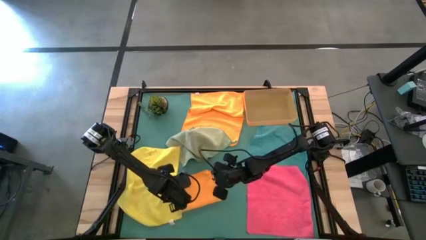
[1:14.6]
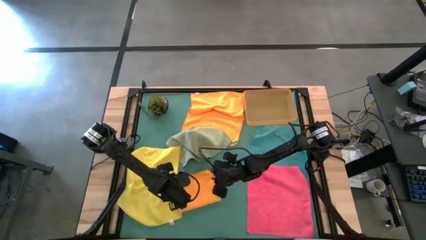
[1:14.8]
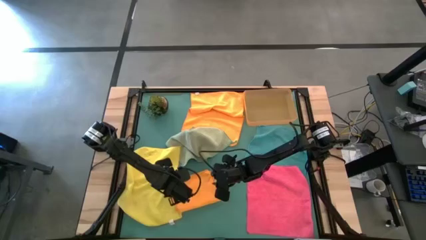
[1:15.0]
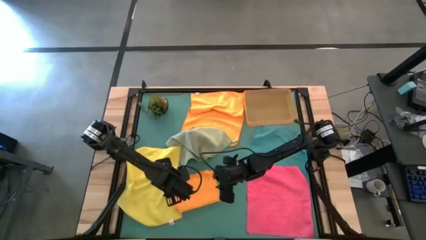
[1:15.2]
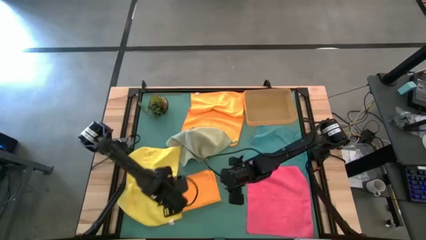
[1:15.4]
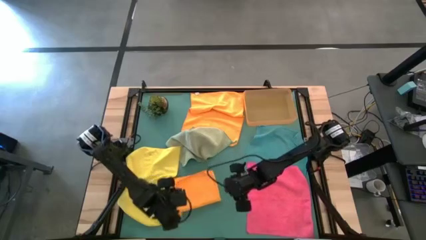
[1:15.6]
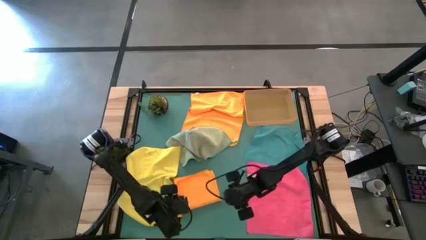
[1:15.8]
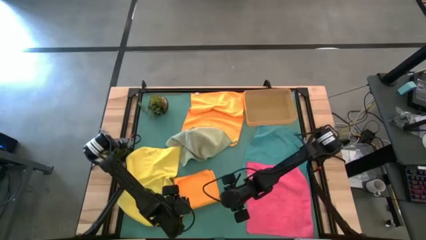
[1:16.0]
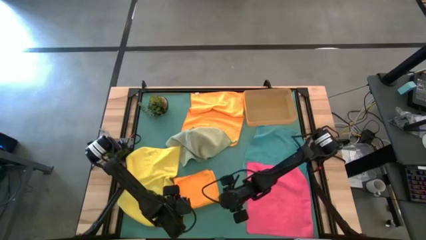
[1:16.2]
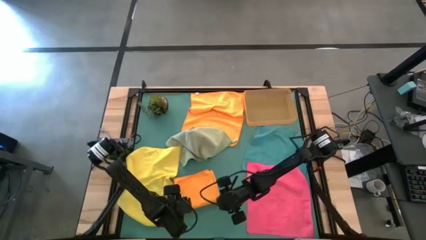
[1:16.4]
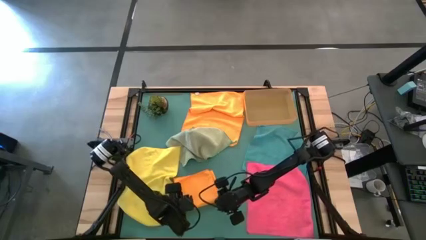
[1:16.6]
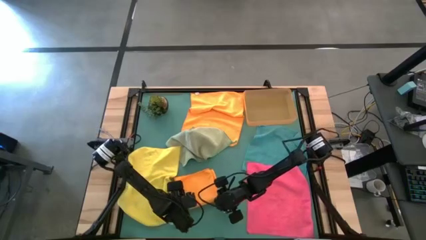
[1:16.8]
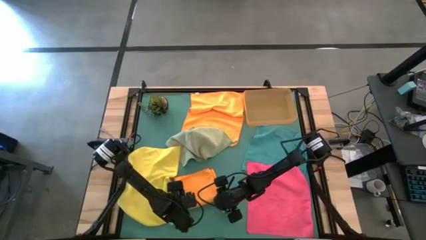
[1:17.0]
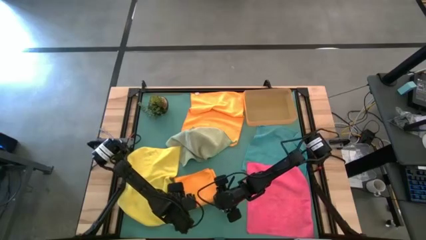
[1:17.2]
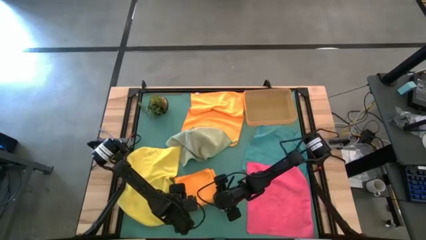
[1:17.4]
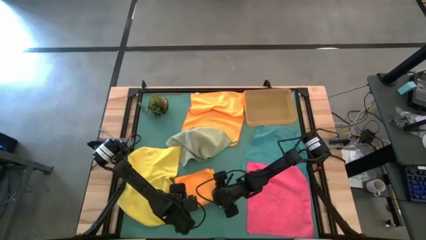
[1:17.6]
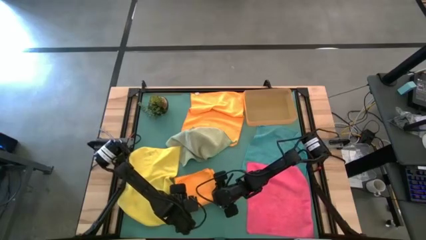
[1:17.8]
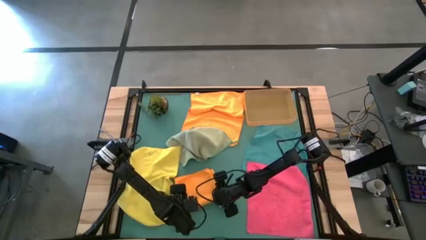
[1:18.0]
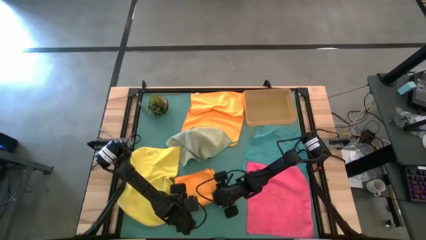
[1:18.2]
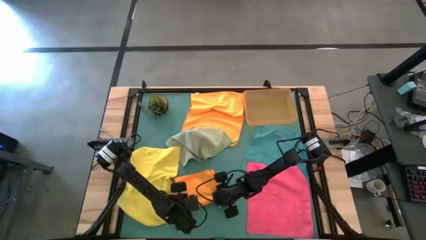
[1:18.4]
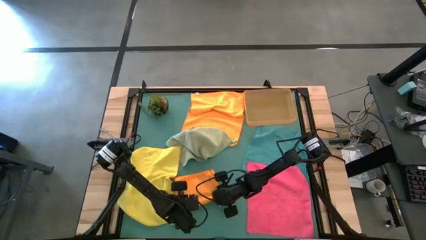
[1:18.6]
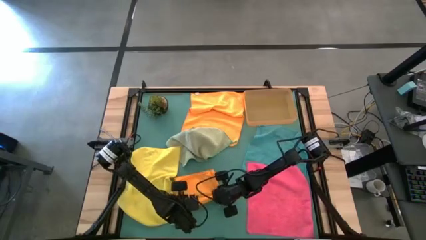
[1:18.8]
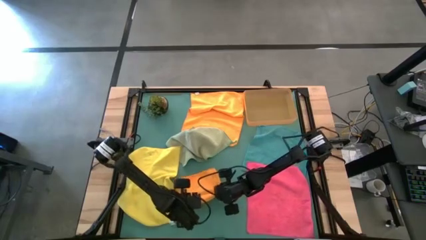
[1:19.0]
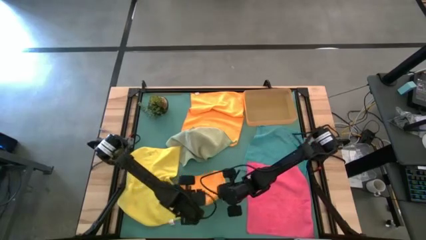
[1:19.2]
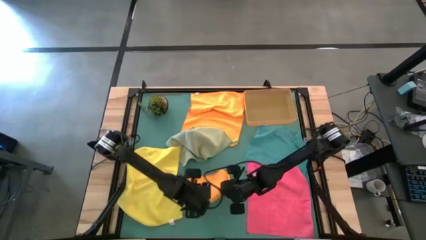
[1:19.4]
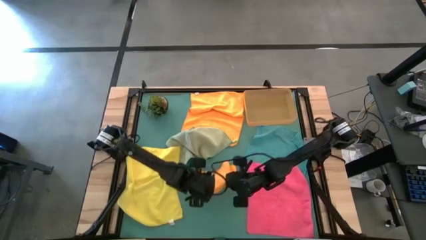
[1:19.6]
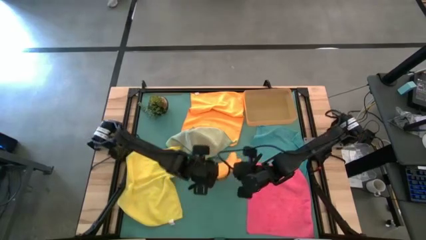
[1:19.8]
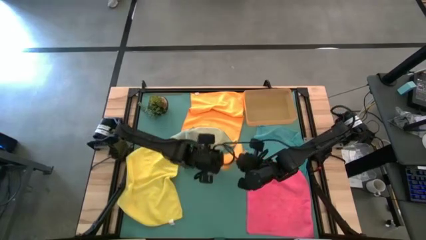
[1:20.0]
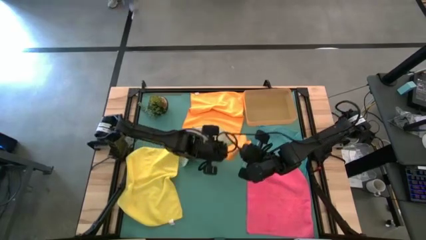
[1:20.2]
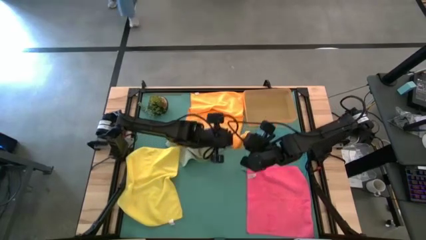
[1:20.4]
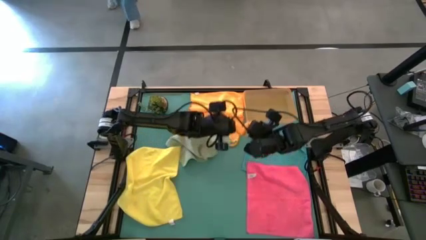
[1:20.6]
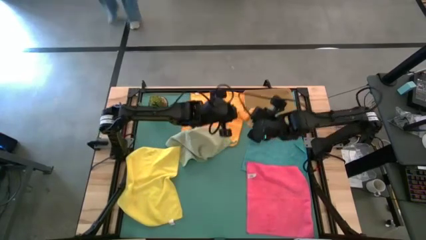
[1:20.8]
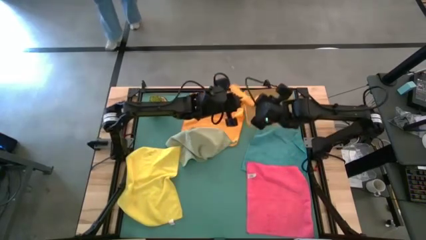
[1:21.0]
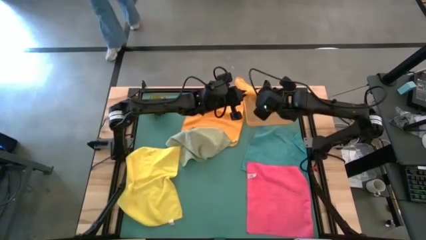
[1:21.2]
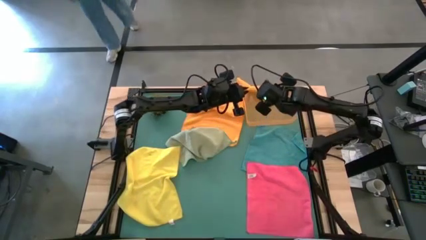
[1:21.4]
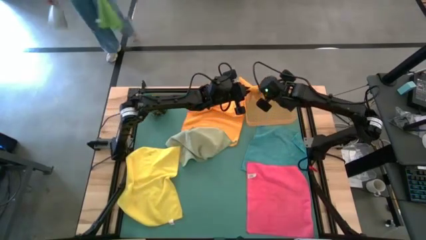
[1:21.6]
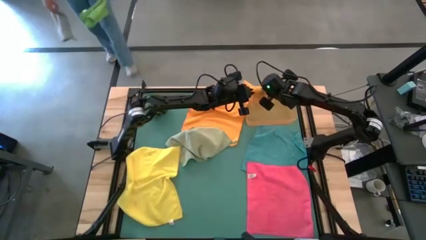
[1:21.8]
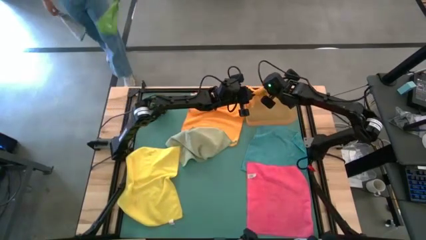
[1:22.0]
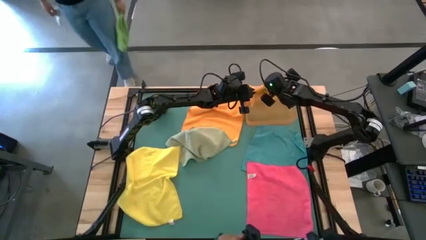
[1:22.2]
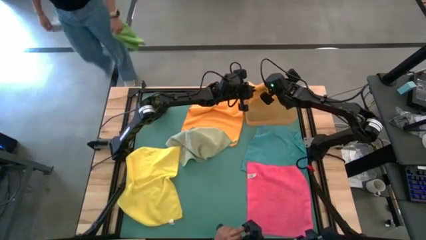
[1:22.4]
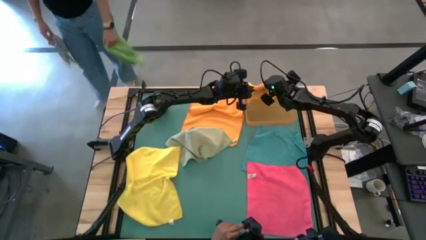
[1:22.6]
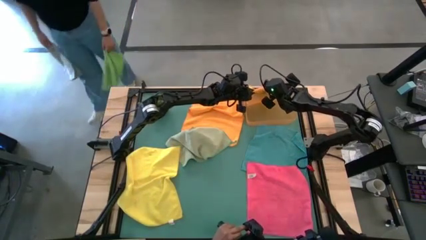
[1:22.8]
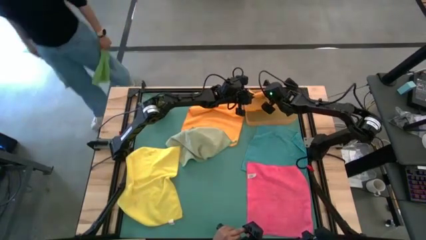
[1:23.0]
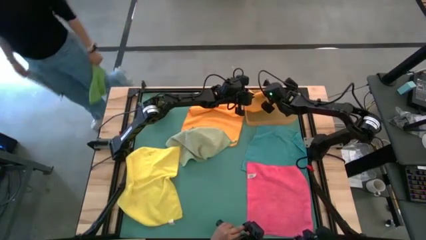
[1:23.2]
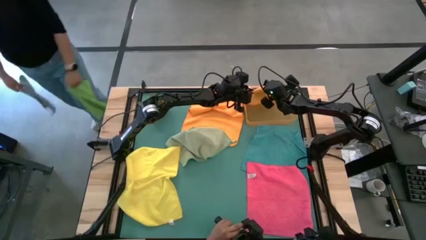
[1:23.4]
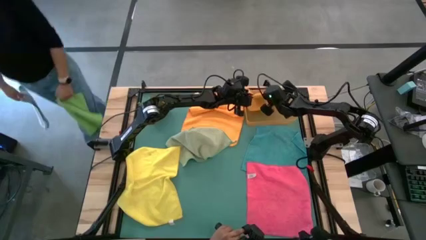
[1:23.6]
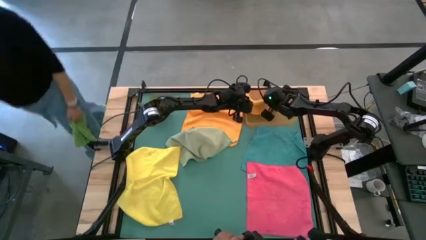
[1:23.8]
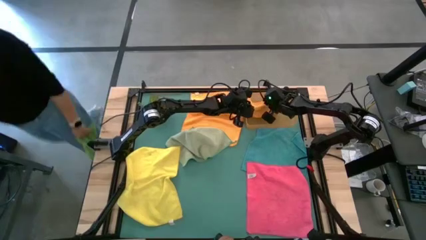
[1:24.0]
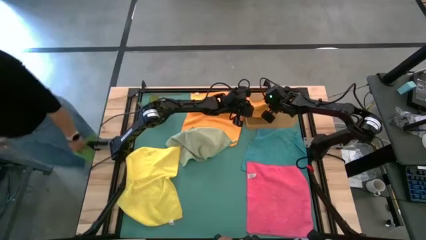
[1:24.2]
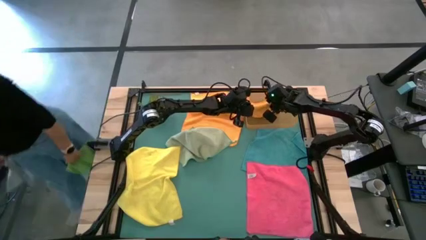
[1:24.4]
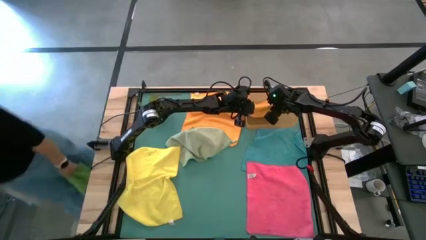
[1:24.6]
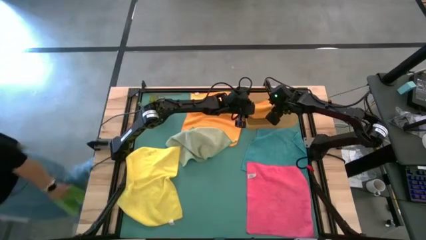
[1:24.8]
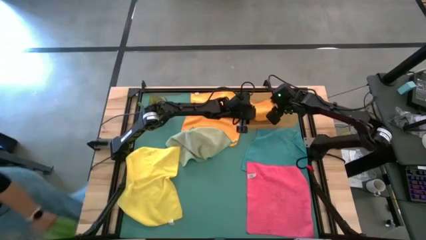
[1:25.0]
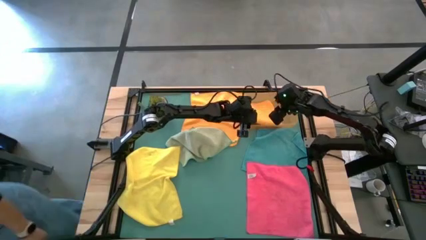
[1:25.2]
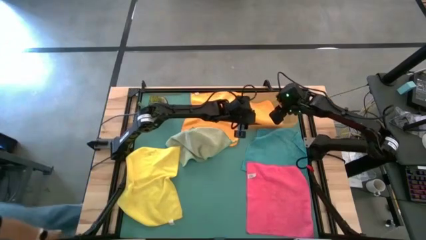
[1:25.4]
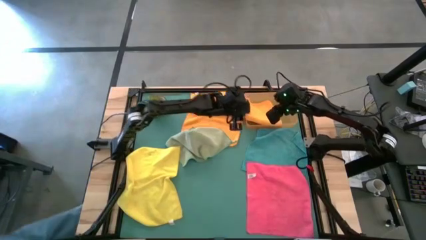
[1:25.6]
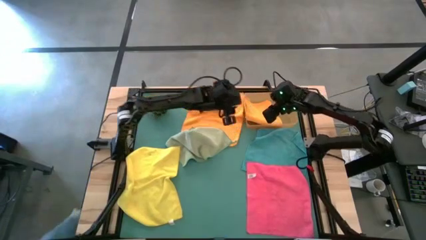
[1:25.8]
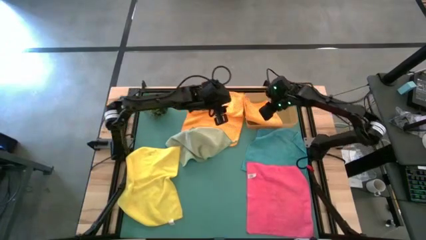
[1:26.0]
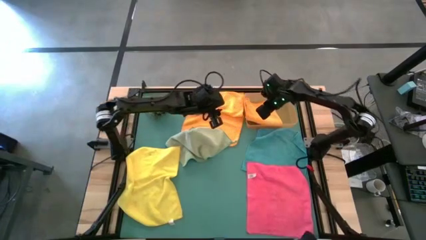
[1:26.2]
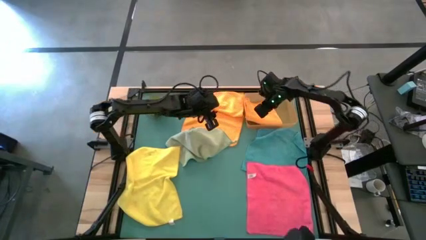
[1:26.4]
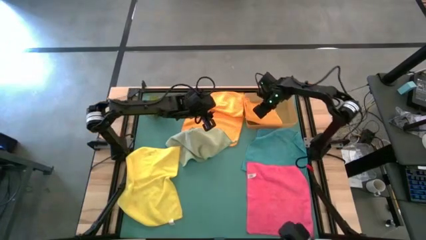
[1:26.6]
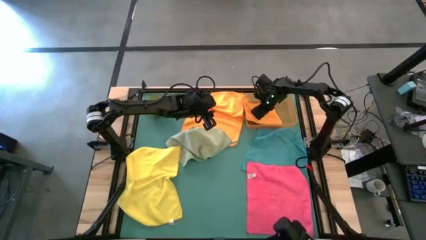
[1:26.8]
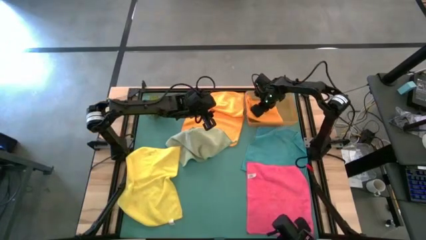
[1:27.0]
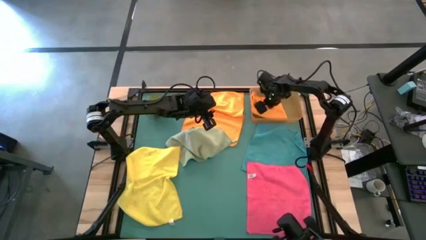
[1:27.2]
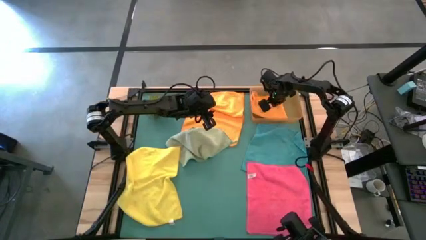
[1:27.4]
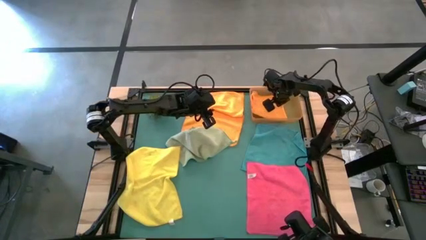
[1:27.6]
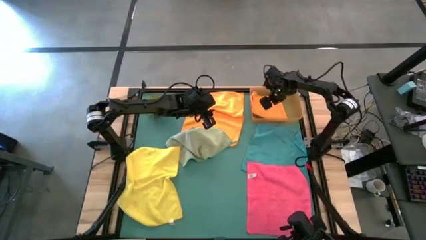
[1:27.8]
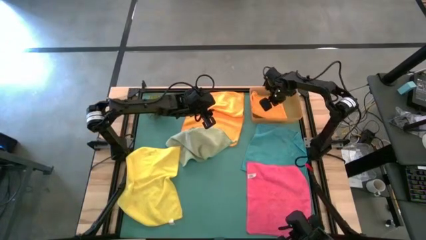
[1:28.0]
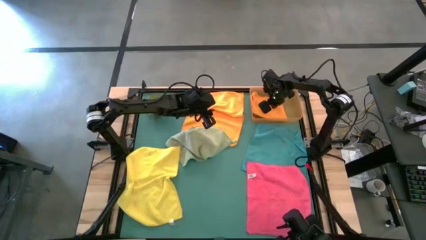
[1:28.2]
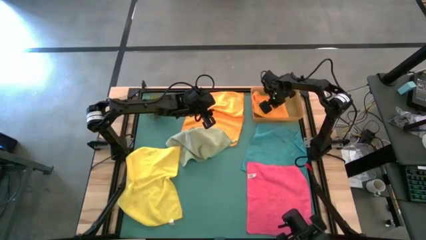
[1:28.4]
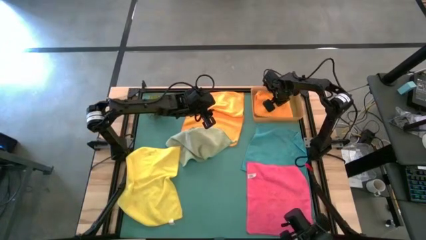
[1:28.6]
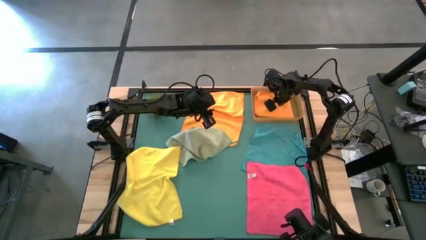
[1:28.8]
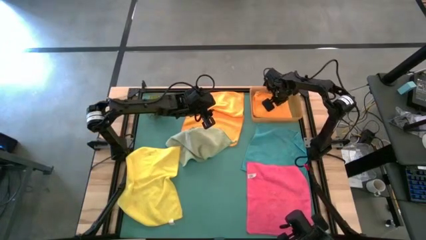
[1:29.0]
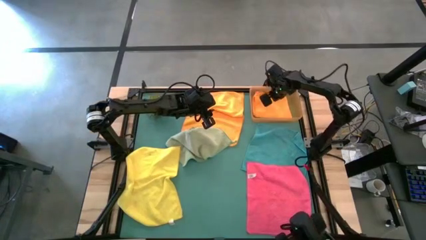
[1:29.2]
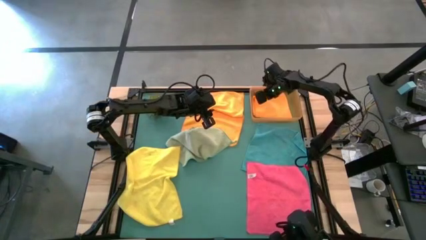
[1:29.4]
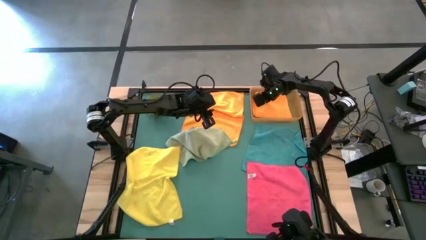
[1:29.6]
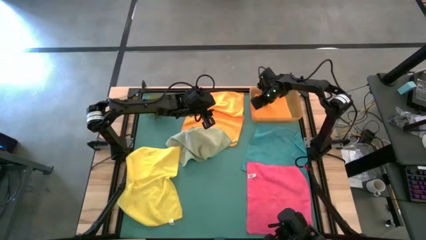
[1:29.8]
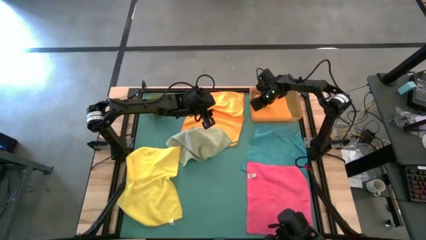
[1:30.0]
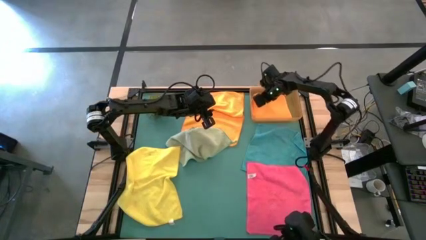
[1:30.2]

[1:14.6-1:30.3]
Task: Fold microfiber towels
Put the folded orange towel into the orange bin
